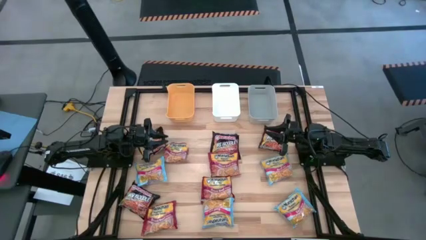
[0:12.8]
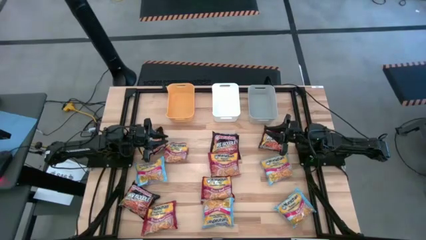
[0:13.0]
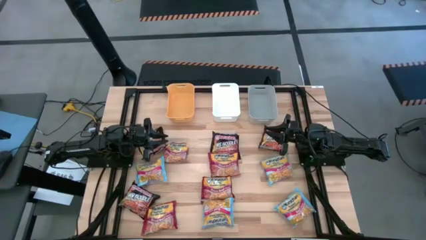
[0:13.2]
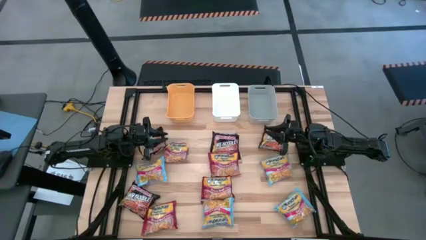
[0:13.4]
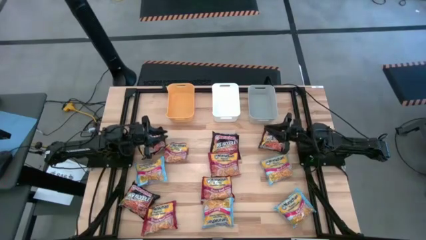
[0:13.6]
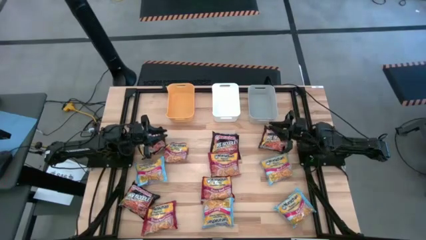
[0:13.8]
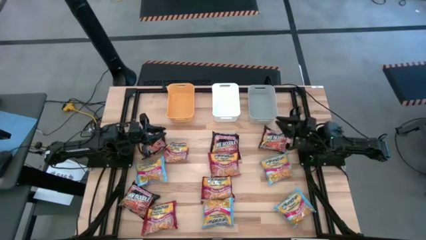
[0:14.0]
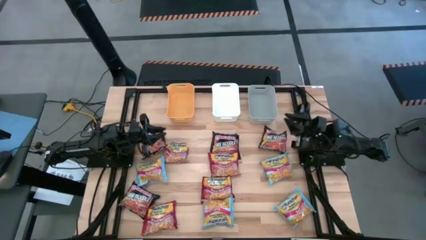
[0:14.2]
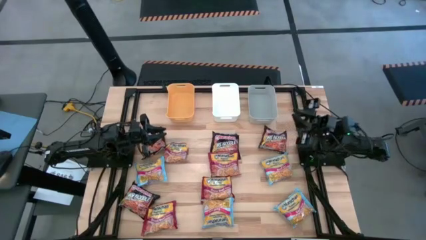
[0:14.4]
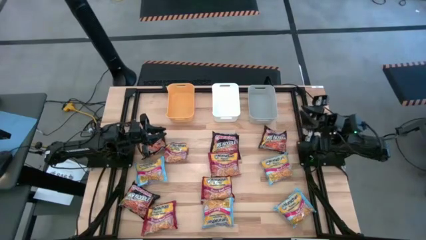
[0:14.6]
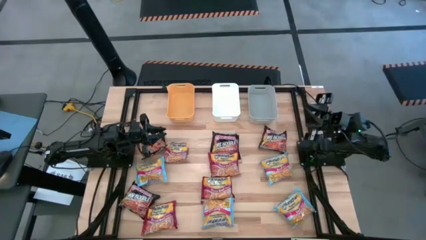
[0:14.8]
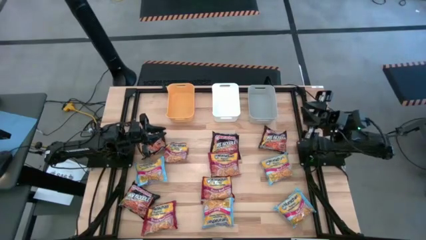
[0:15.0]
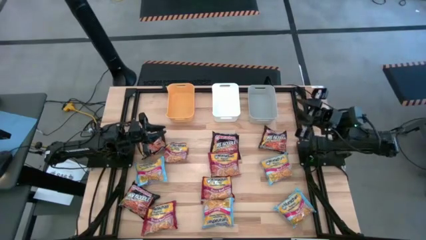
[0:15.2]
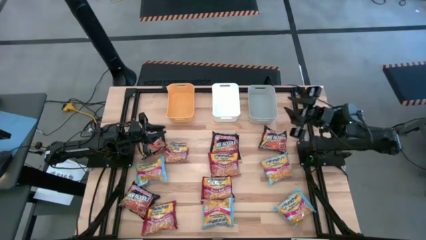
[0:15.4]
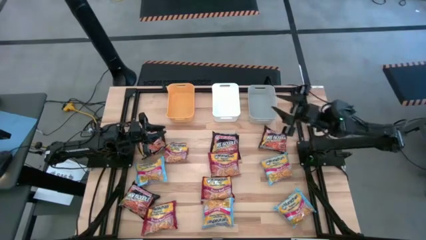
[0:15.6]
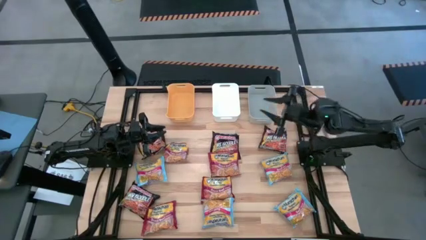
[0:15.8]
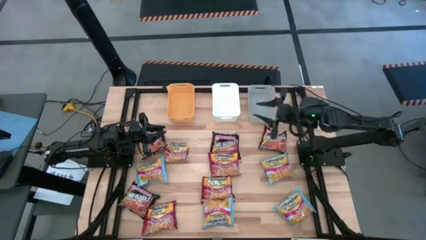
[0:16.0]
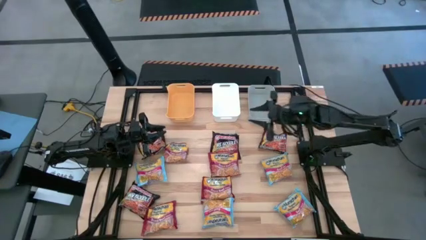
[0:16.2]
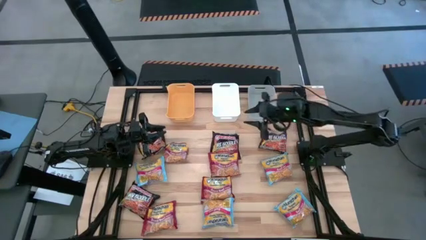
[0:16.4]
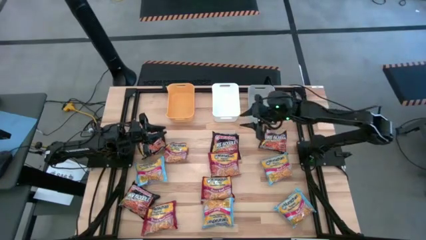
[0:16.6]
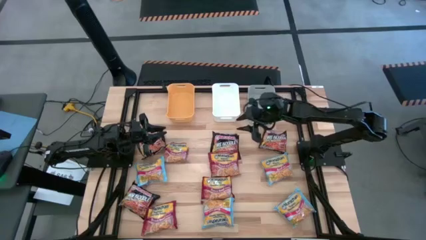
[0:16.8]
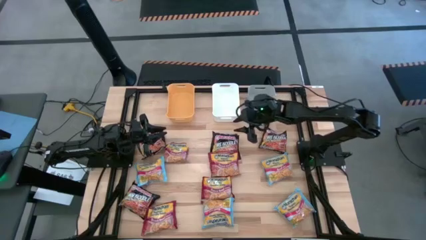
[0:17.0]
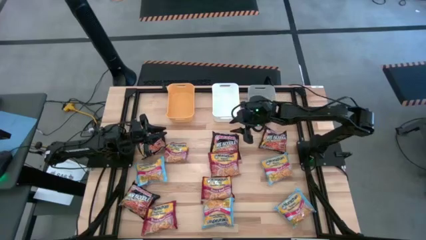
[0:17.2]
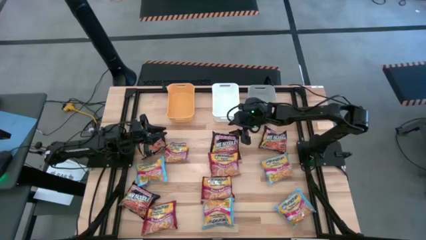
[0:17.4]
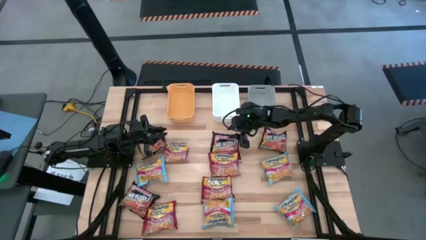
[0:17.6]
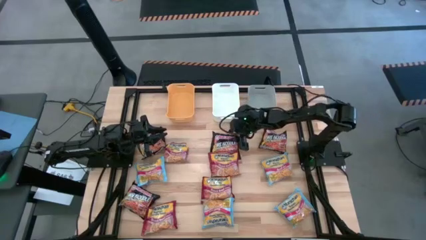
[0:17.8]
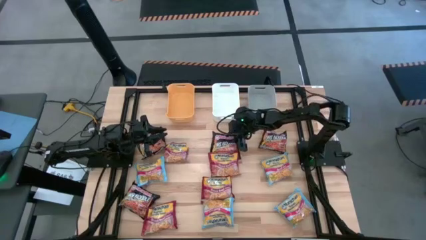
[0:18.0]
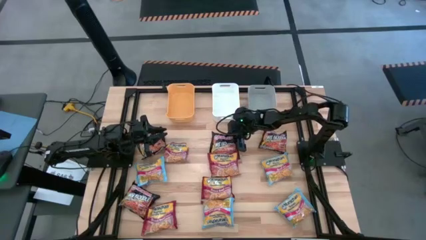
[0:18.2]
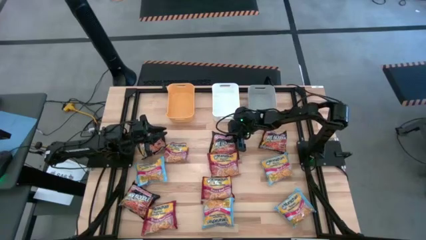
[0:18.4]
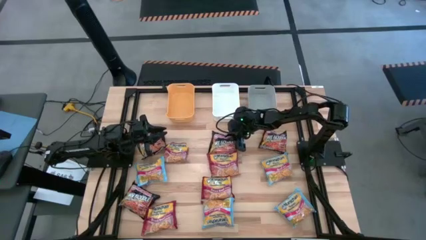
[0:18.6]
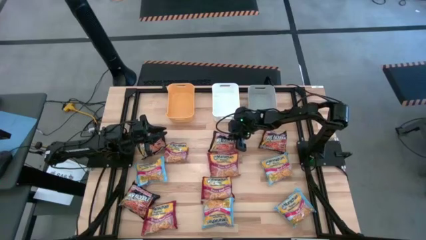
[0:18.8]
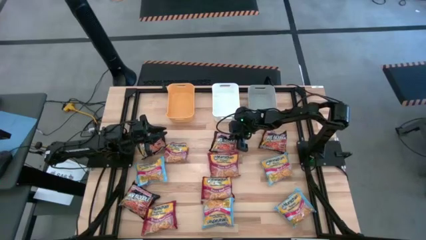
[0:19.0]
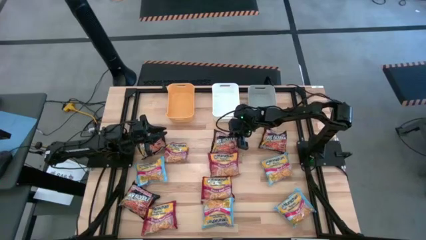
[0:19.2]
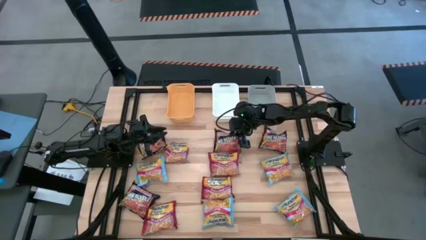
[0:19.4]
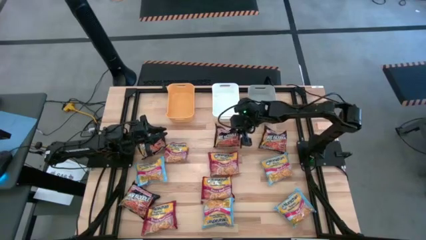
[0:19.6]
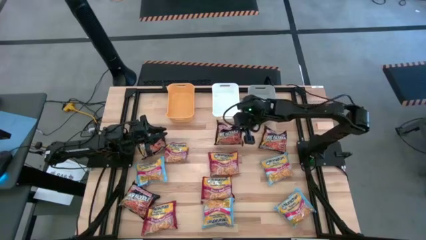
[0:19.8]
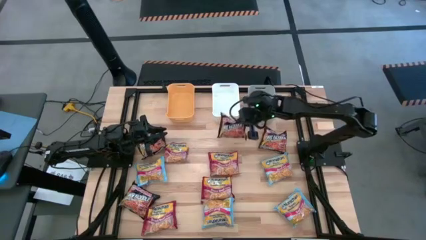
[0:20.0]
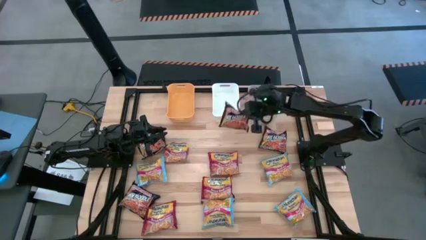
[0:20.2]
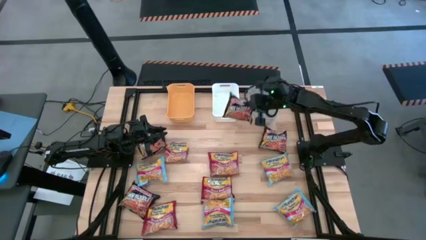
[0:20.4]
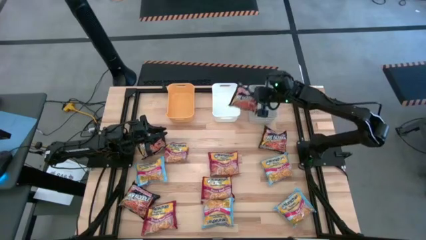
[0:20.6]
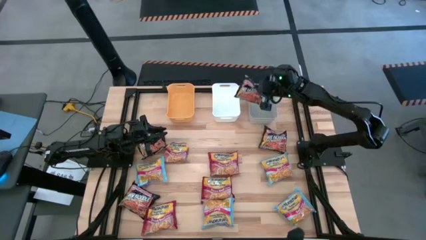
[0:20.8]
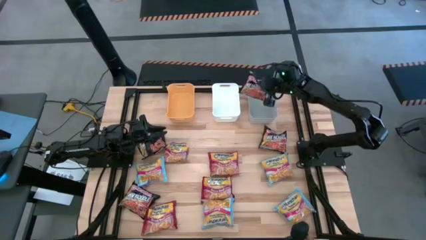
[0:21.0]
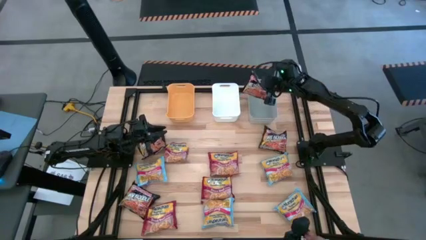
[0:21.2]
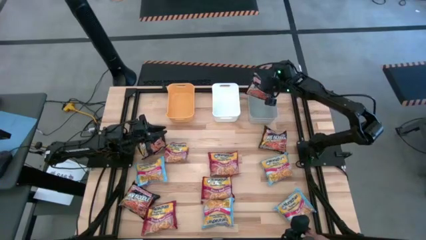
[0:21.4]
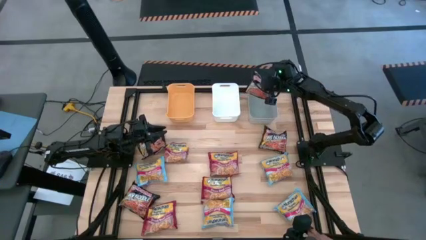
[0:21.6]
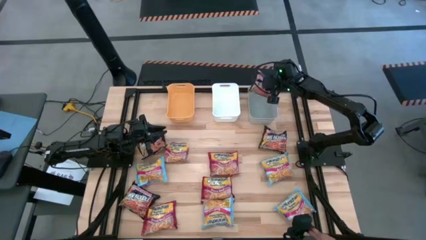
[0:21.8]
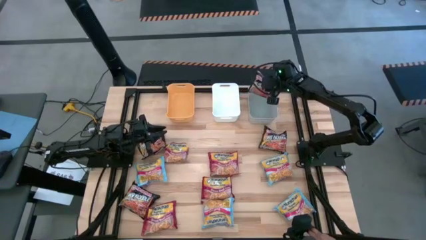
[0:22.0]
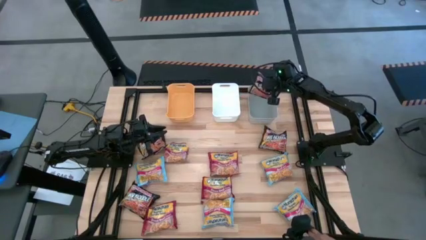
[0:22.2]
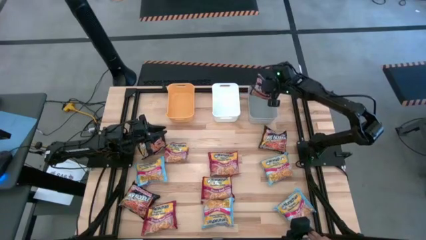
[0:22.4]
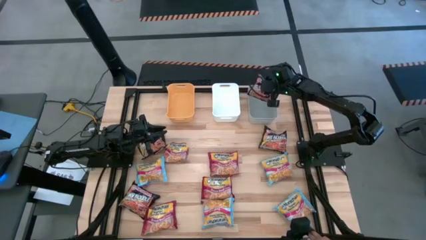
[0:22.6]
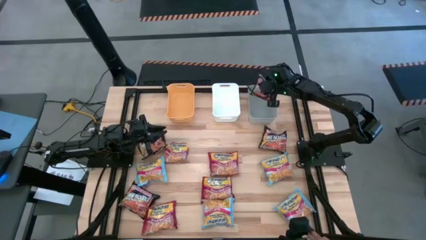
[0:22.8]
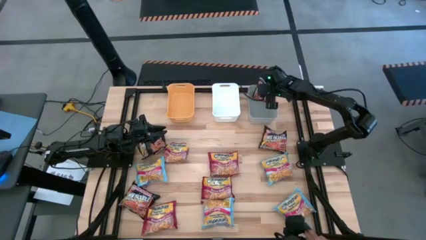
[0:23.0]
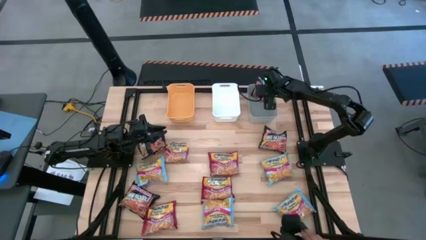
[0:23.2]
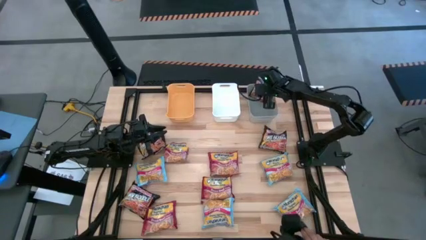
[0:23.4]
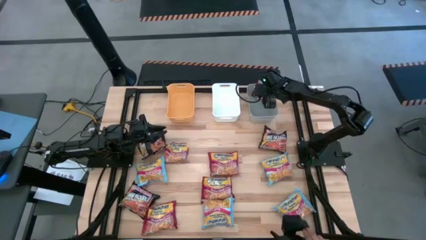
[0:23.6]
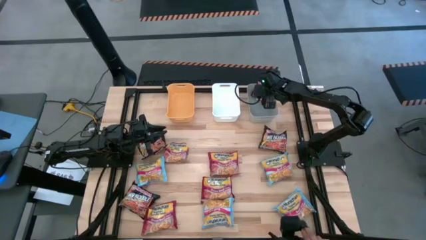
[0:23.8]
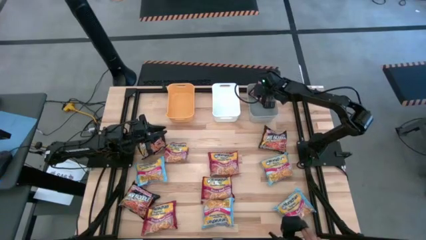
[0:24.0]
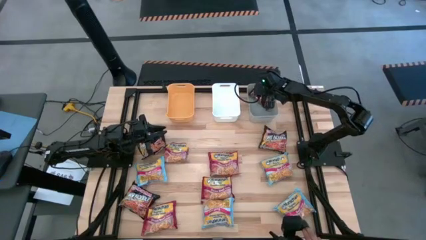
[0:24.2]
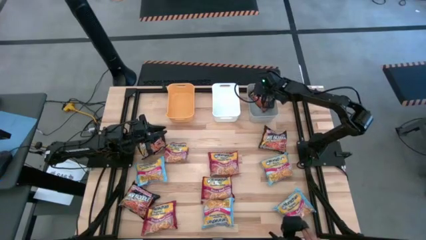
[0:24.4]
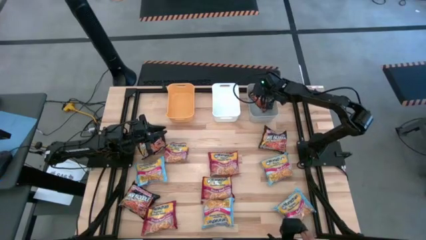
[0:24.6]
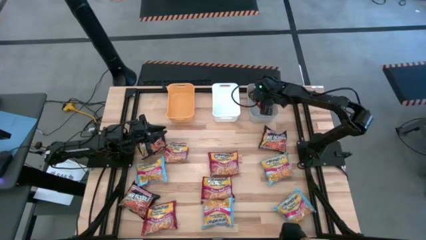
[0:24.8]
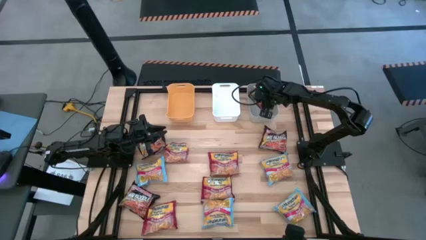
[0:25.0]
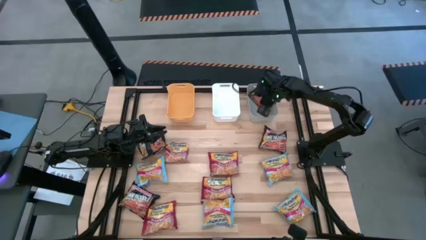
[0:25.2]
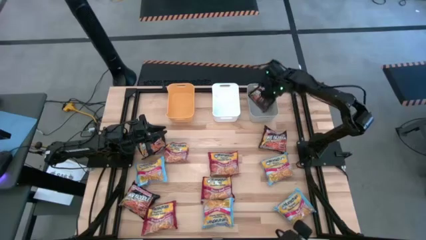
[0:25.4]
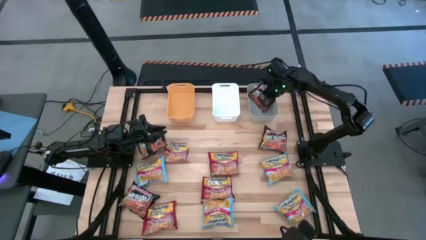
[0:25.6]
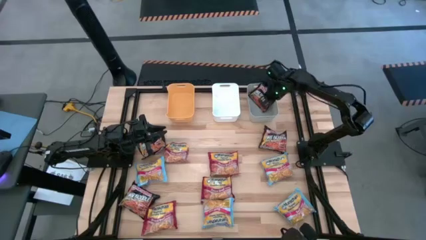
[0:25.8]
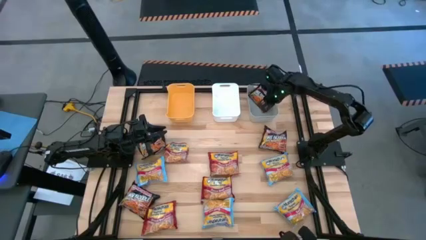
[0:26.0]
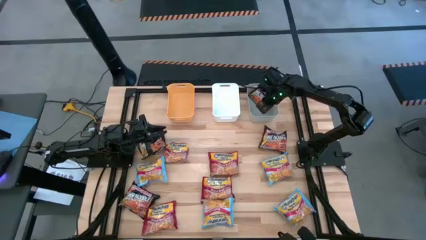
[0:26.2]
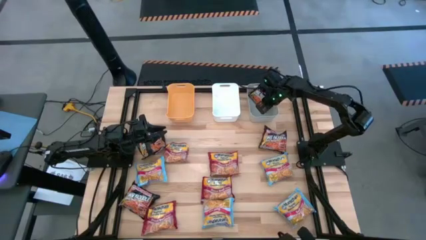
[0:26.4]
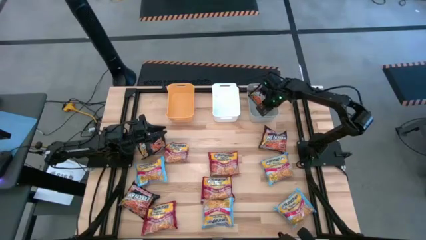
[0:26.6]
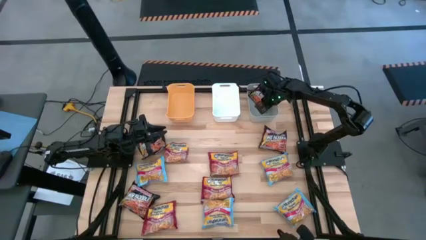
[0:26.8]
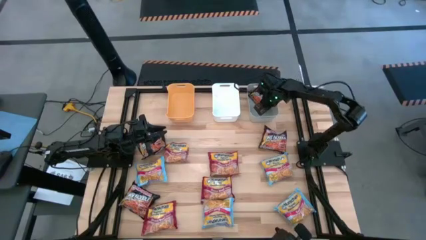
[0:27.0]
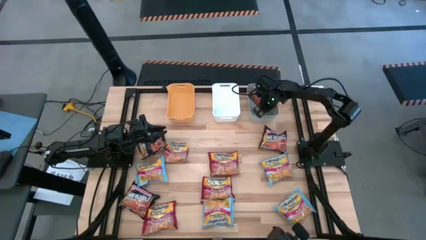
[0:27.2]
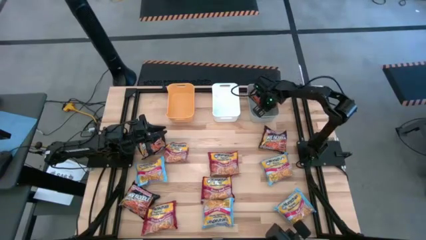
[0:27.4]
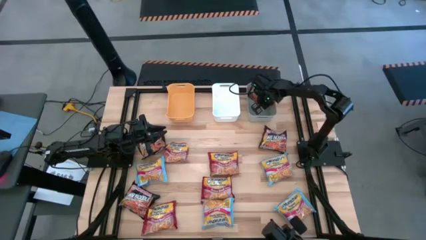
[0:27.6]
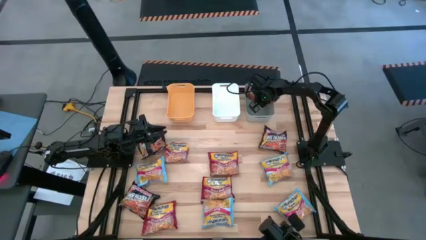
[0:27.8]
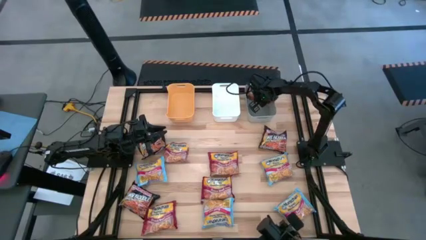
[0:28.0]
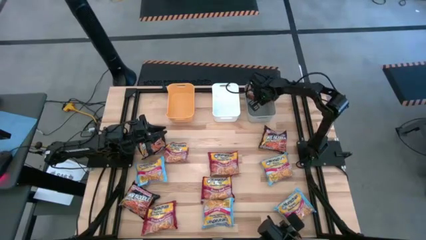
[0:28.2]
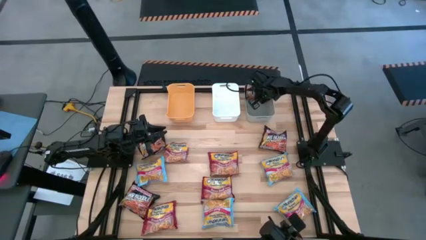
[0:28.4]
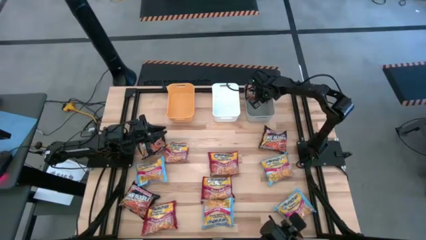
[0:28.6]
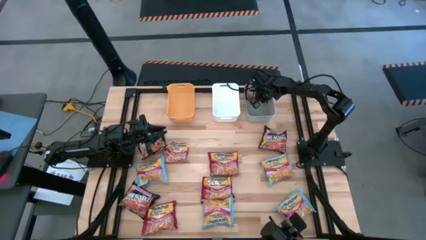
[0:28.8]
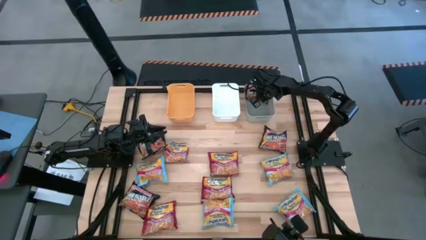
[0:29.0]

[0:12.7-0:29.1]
Task: Sort Maruchan noodles
Put the black noodle pack into the gray bin
